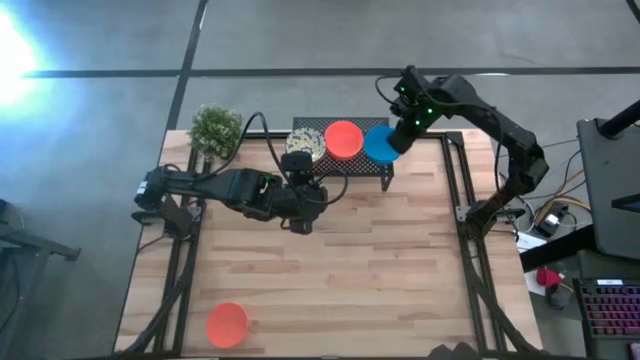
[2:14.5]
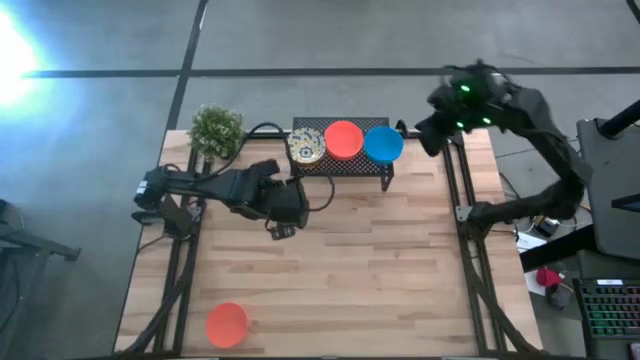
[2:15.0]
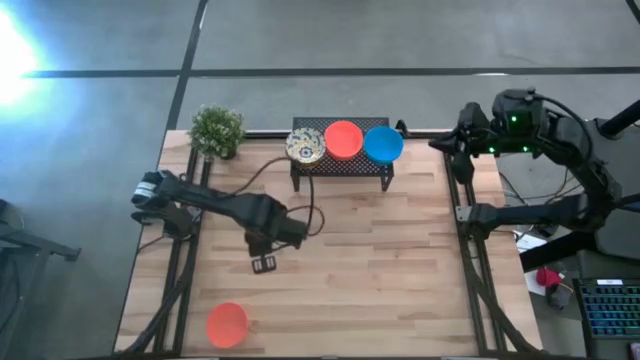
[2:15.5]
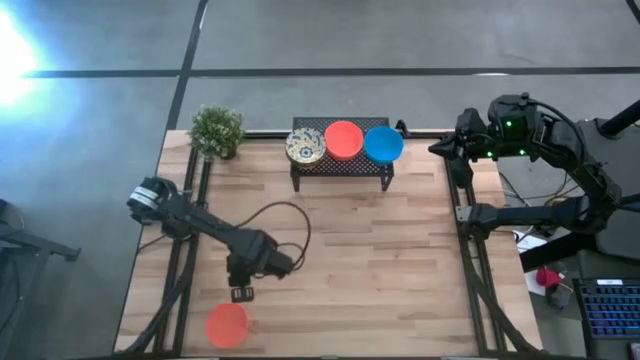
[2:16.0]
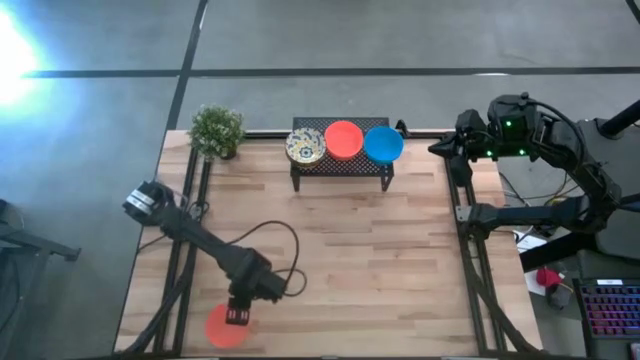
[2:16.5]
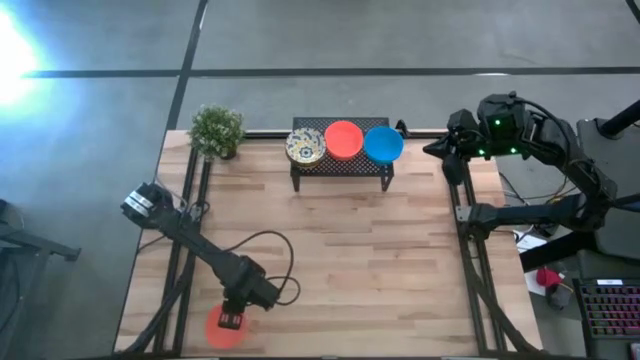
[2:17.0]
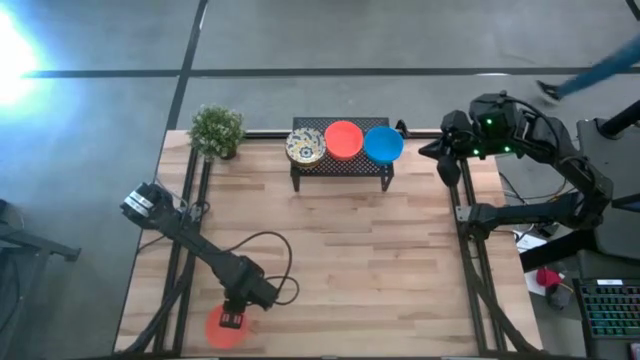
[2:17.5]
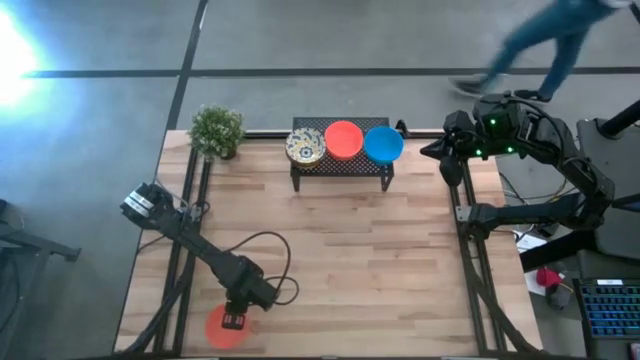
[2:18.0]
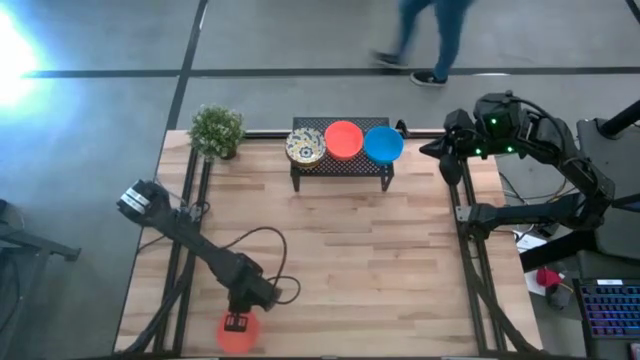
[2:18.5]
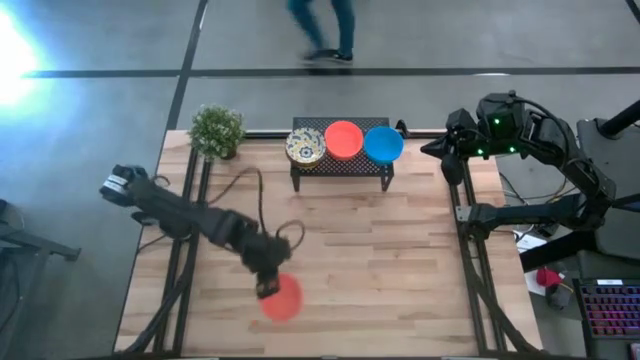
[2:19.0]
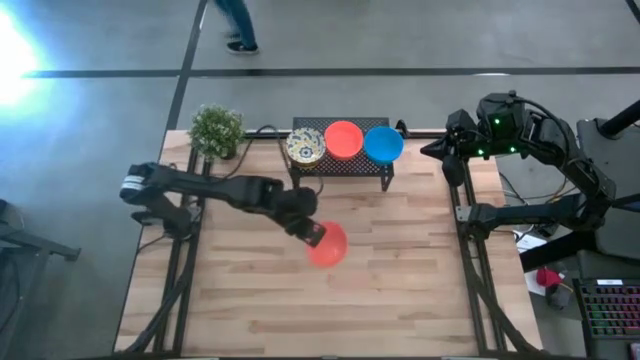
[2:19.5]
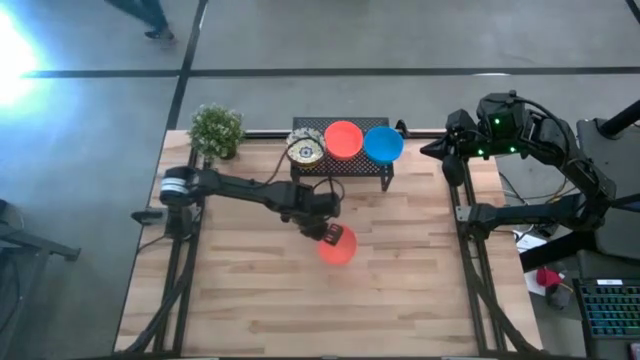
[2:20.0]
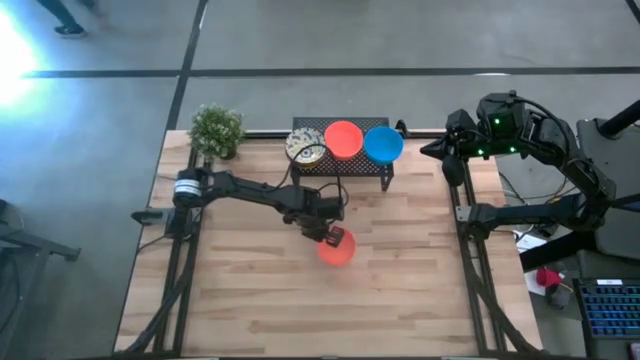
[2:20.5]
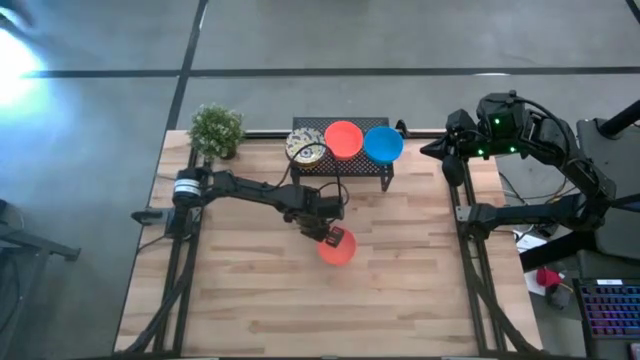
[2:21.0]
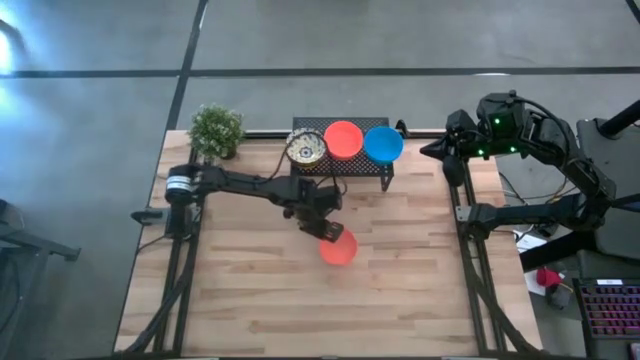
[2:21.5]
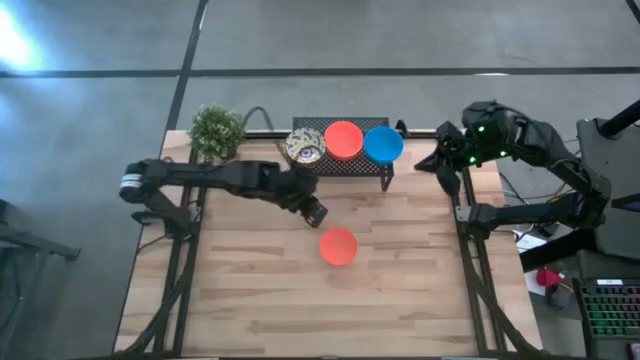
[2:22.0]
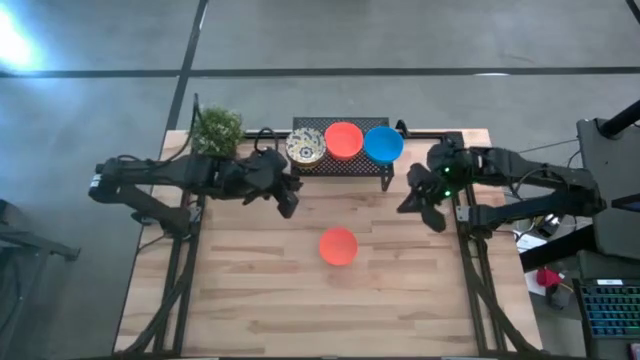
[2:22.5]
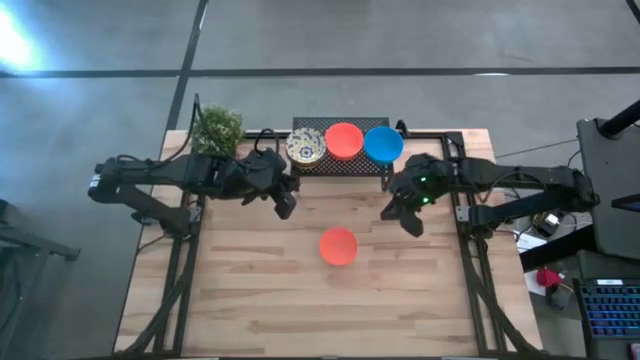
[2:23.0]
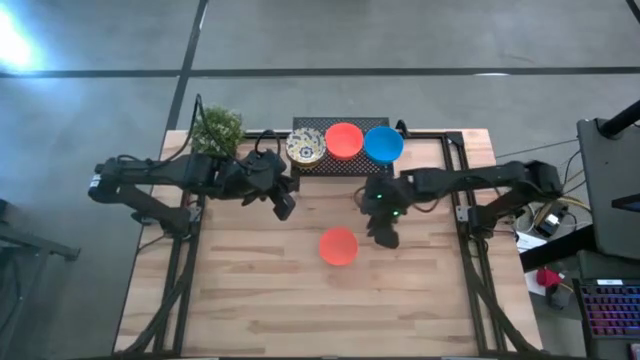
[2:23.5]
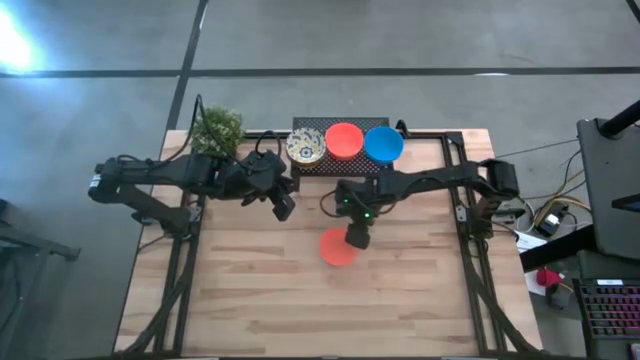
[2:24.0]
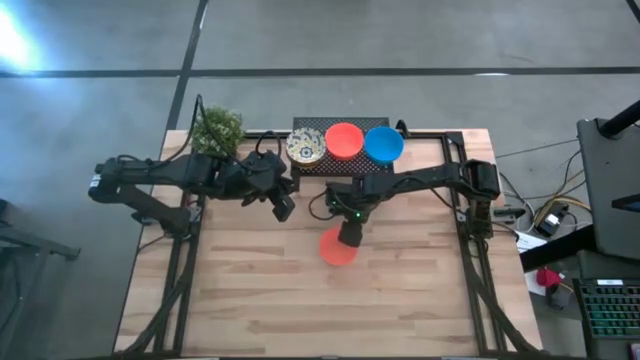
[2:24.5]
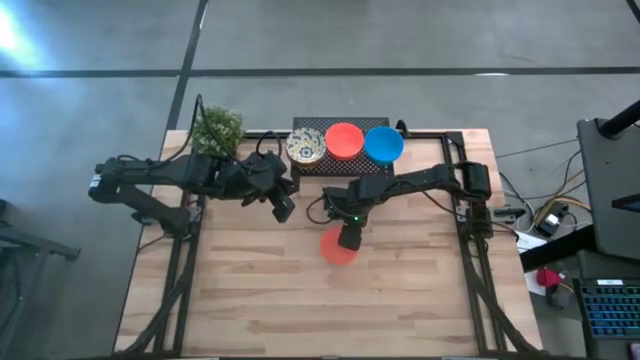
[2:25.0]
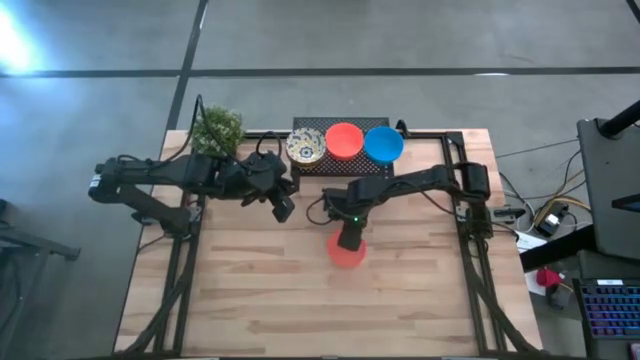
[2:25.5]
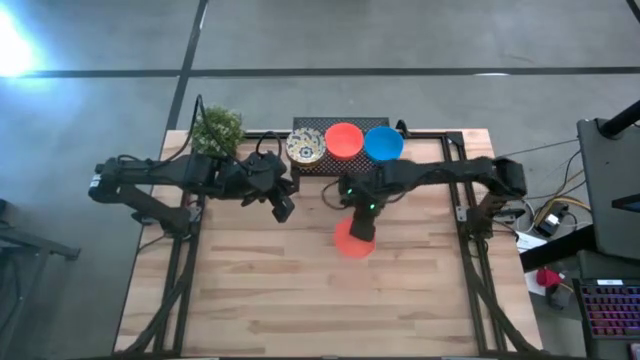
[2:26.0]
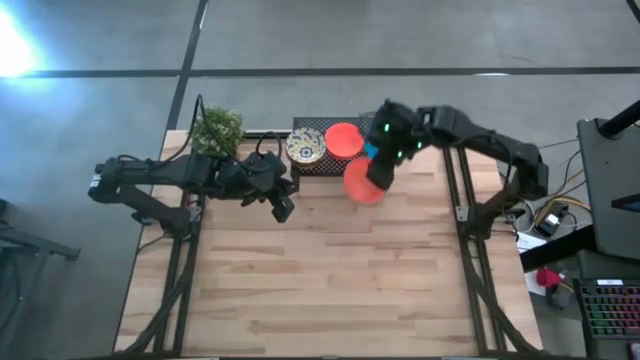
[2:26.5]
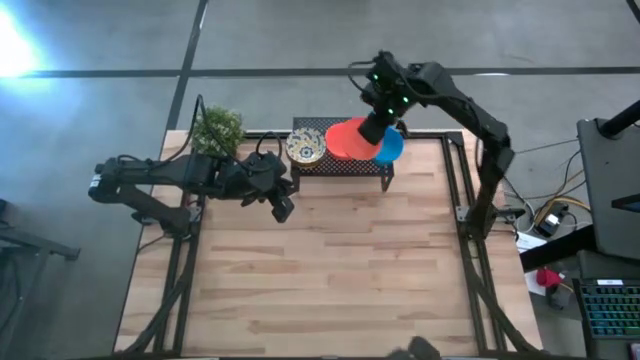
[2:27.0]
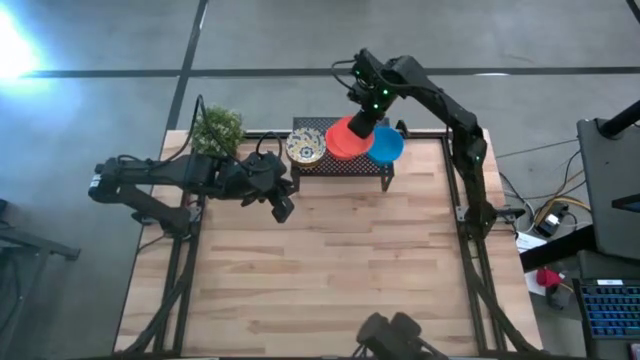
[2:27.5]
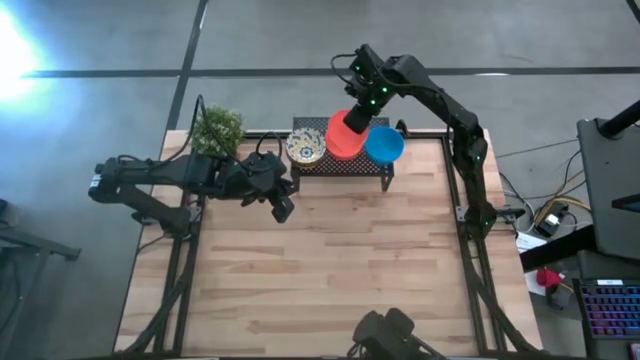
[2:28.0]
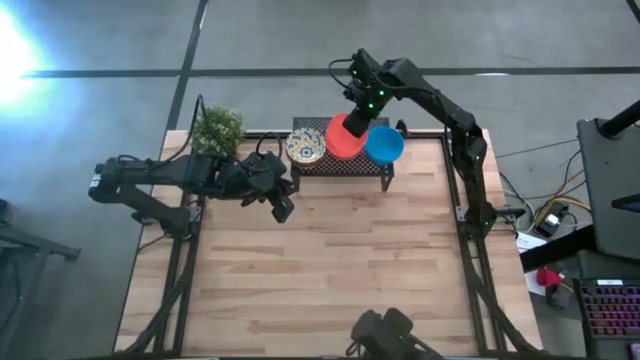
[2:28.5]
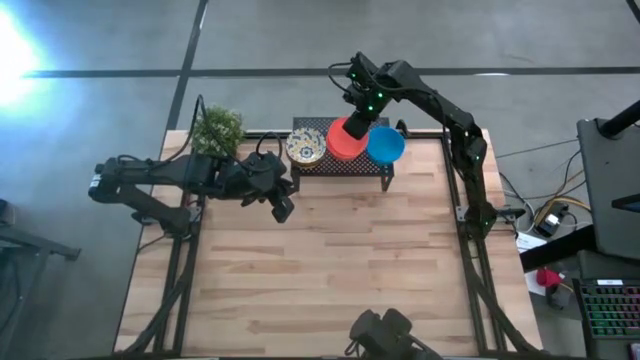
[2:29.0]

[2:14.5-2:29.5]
Task: Pick & Place Mini bowls
Stack the orange bowl on the orange bowl on the shelf

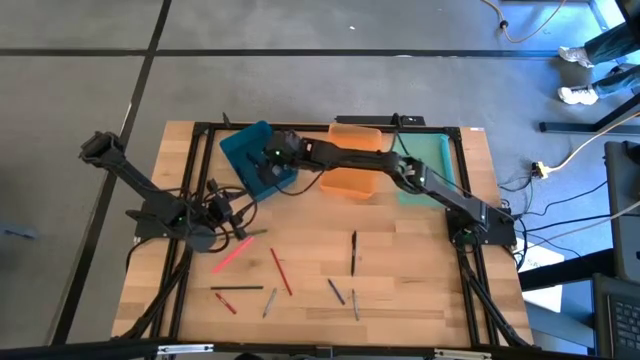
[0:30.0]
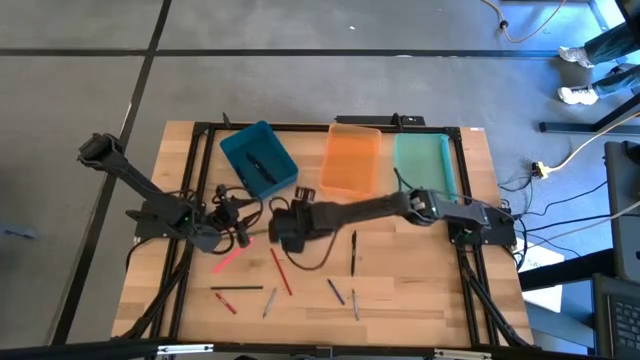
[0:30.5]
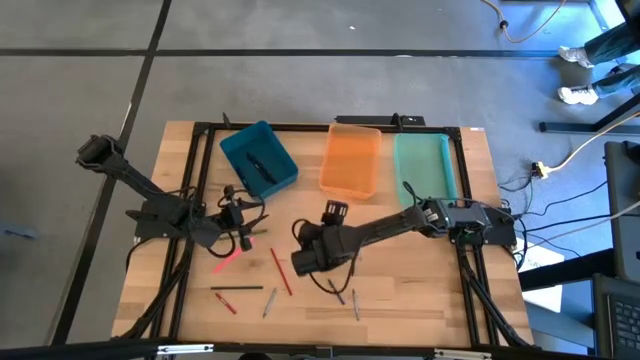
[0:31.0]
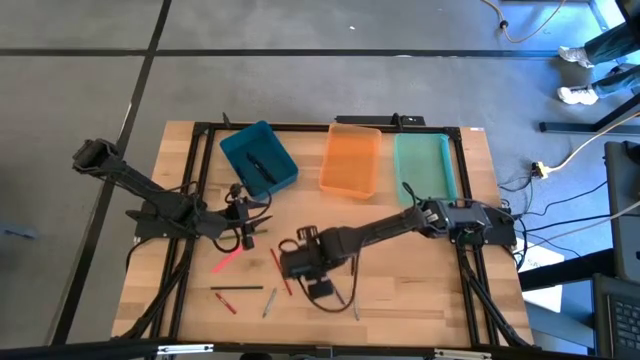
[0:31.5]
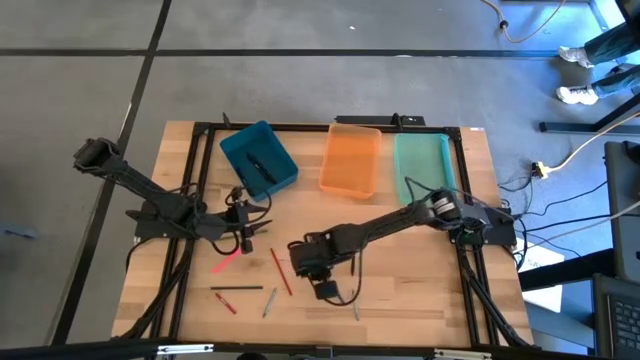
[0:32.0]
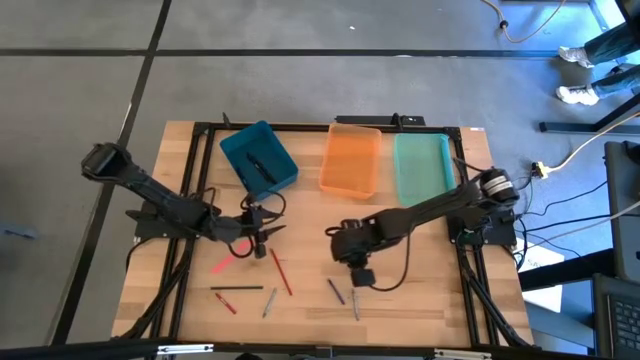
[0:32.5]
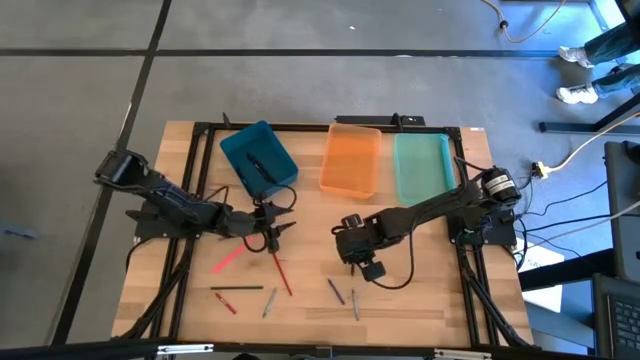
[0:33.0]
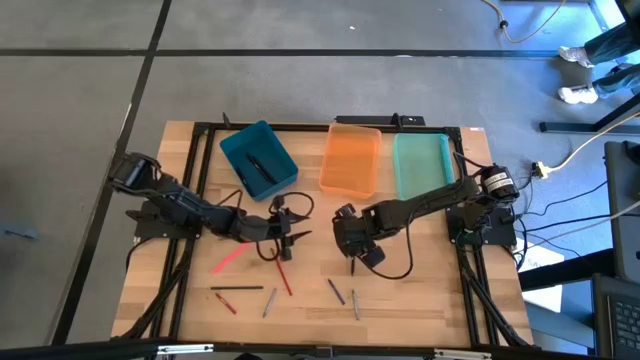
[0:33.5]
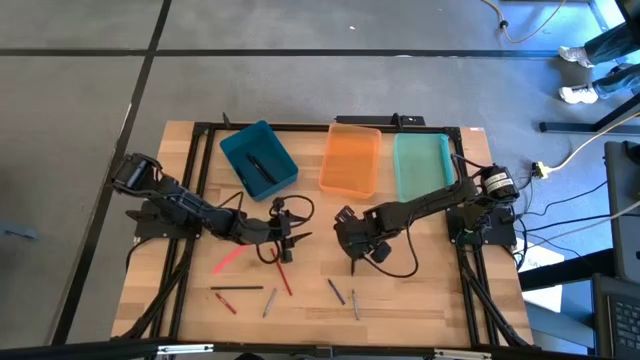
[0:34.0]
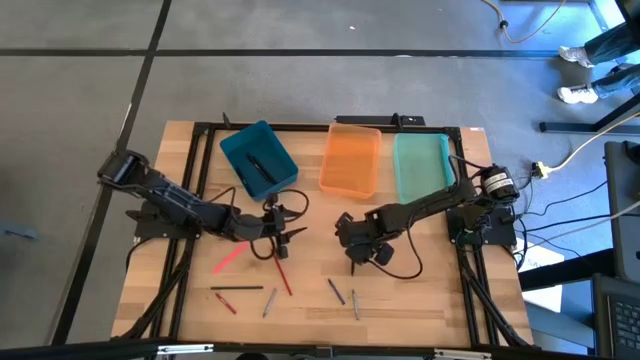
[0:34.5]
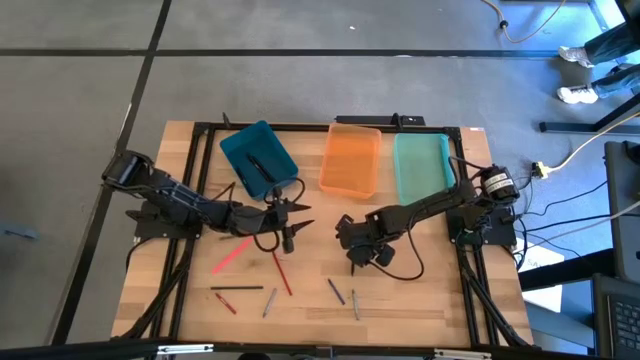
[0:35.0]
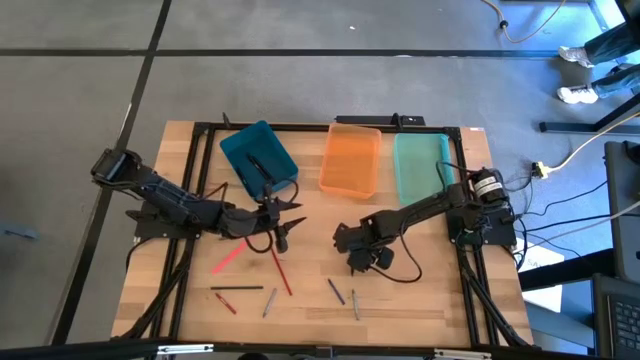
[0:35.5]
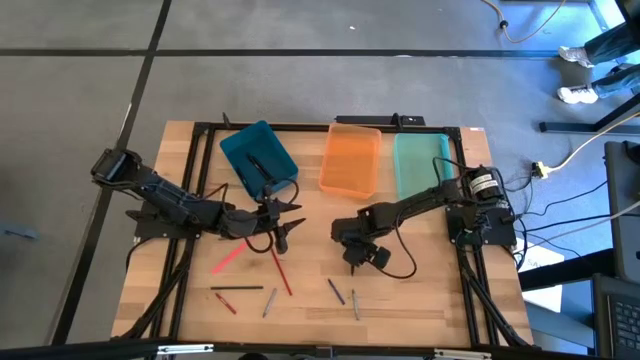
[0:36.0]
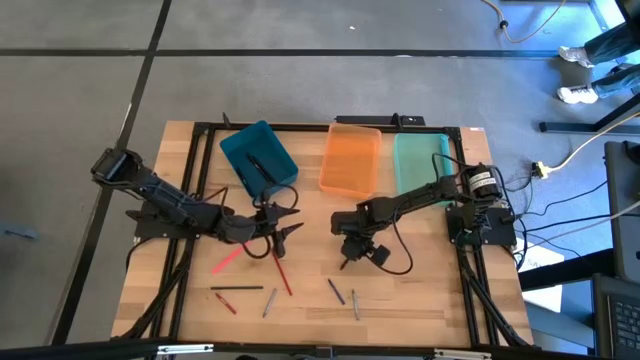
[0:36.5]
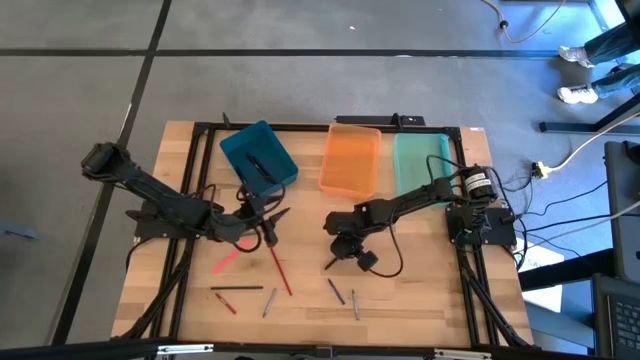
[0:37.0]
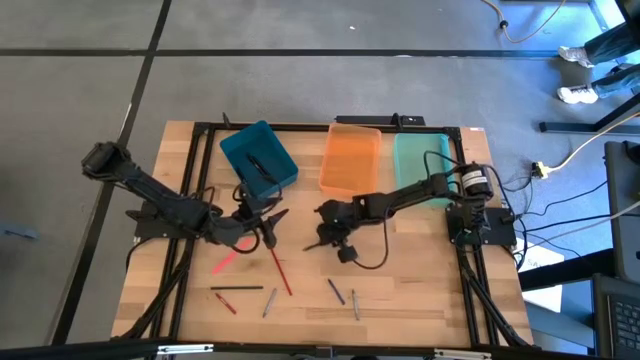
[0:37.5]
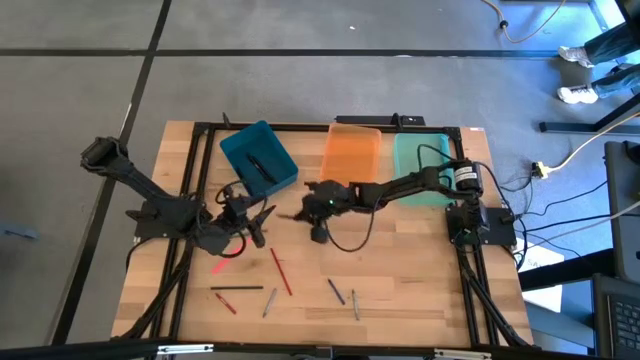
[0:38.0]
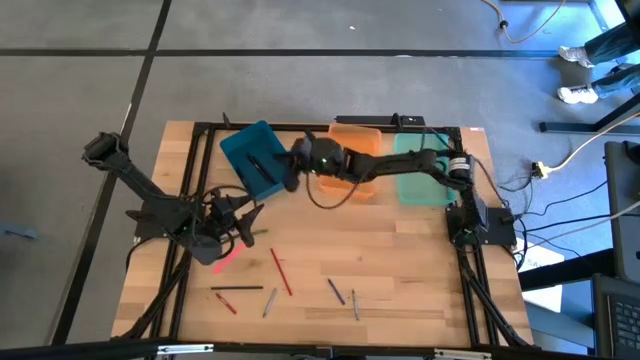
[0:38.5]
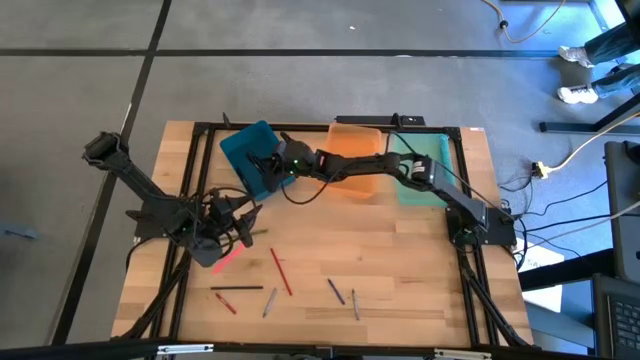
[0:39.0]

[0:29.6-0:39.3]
Task: Sort crayons/erasers/pens/pencils in bins
Put the black pen into the blue bin
